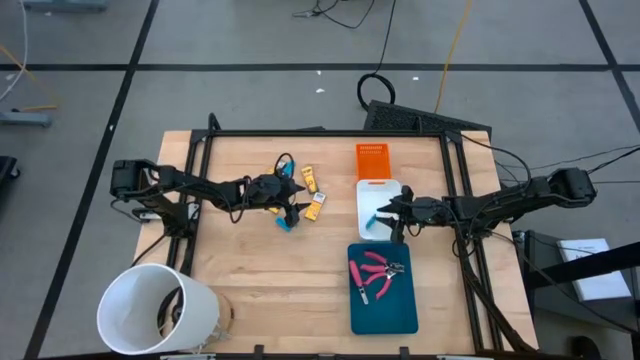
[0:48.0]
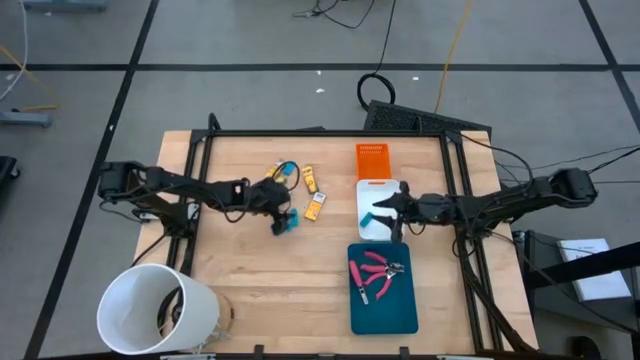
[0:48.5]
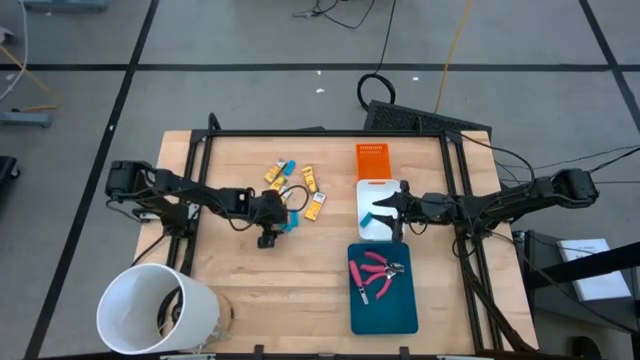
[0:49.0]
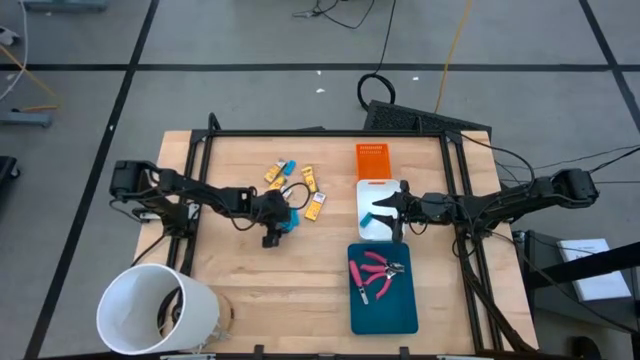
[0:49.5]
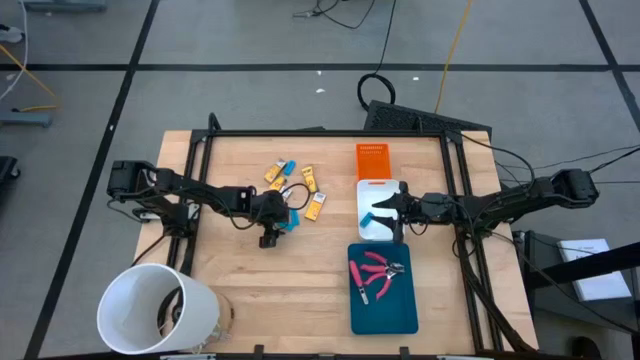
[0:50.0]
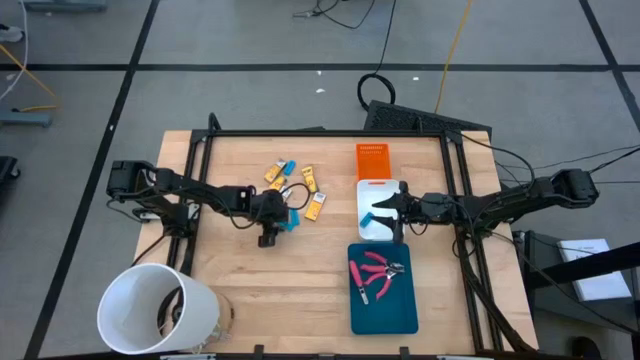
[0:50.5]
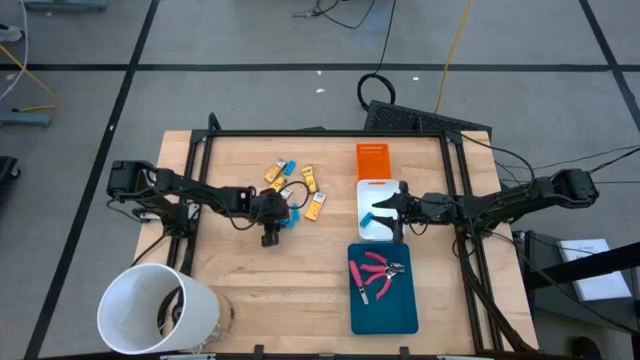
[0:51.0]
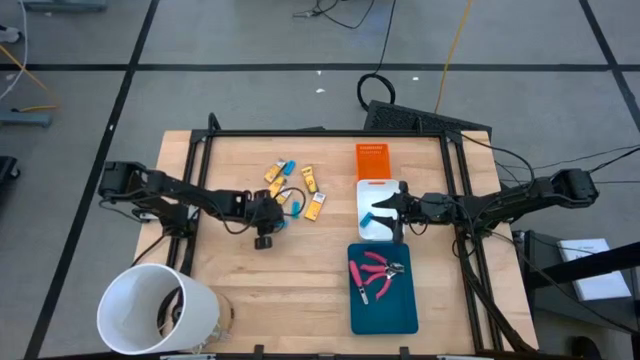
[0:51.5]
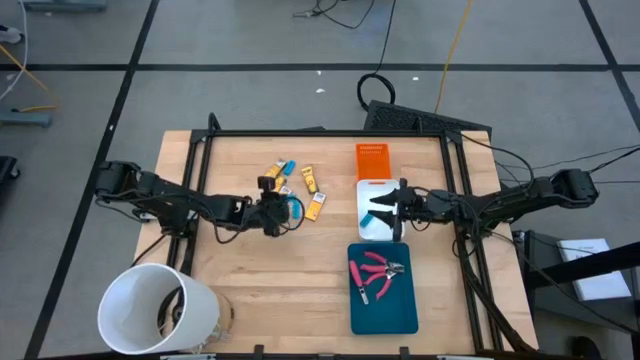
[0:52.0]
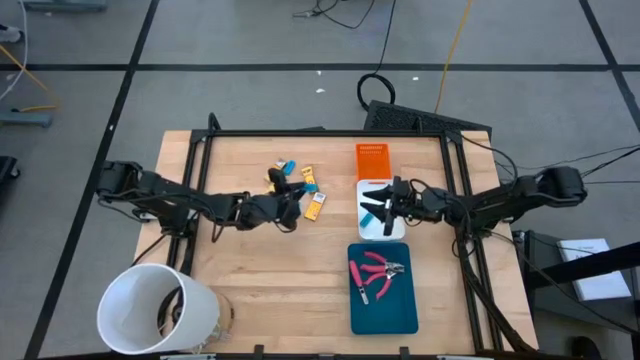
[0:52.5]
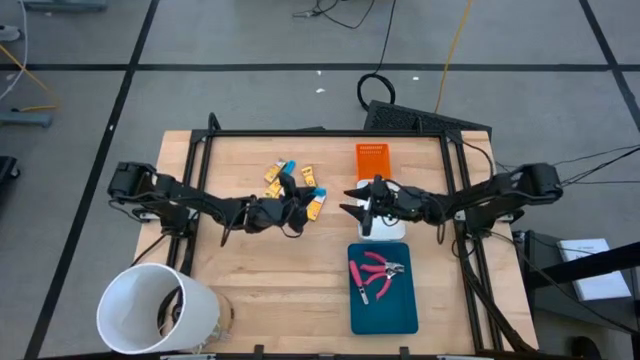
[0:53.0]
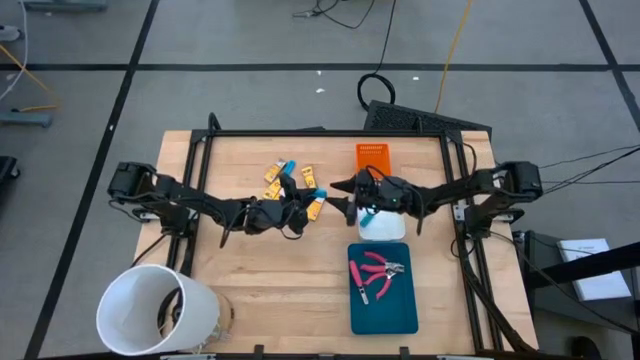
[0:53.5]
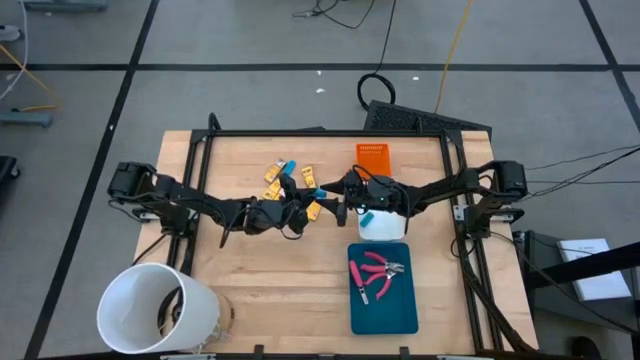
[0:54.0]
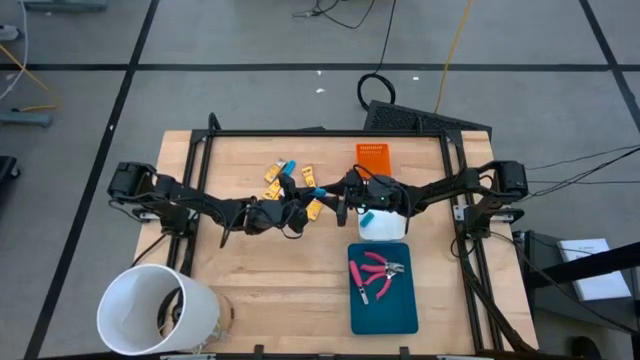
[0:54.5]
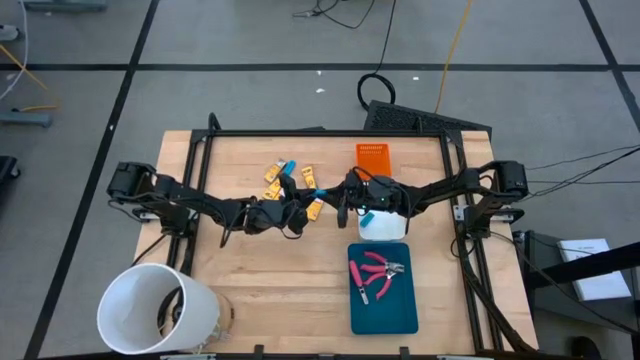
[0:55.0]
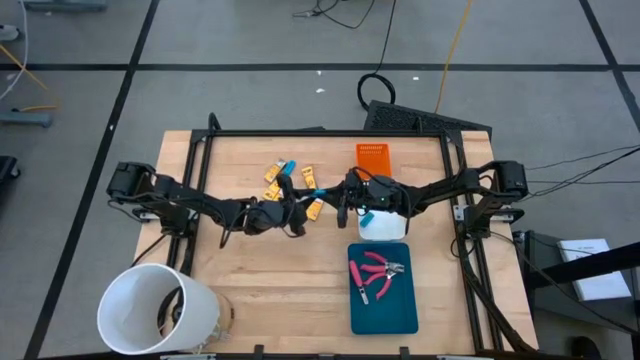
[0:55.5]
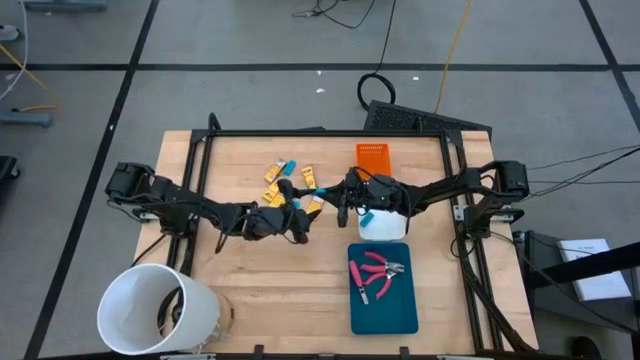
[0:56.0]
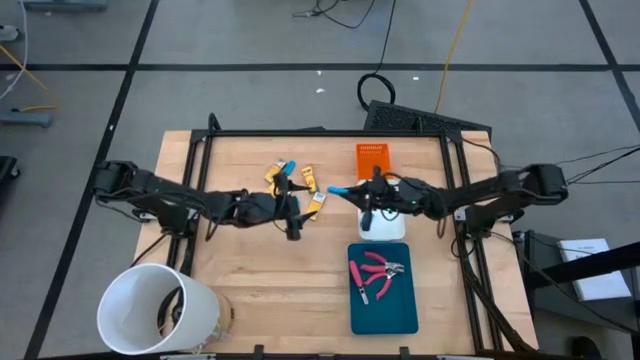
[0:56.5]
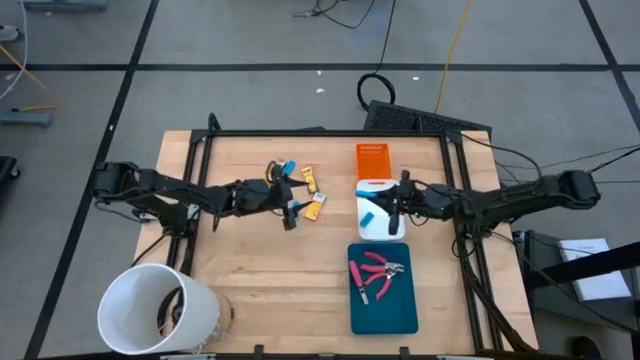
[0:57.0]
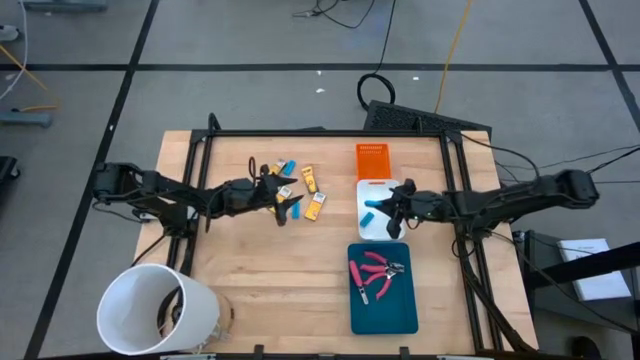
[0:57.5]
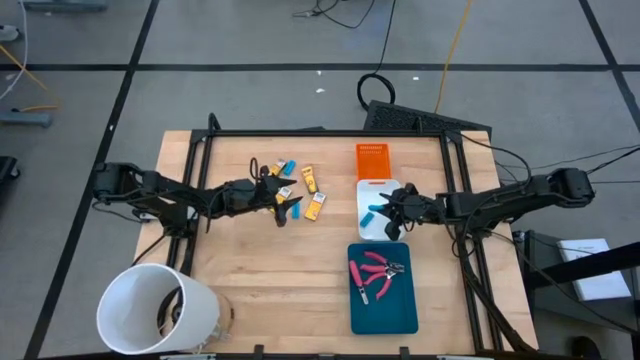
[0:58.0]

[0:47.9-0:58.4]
Task: Pick & Place School Supplies
Put the blue eraser into the white bin

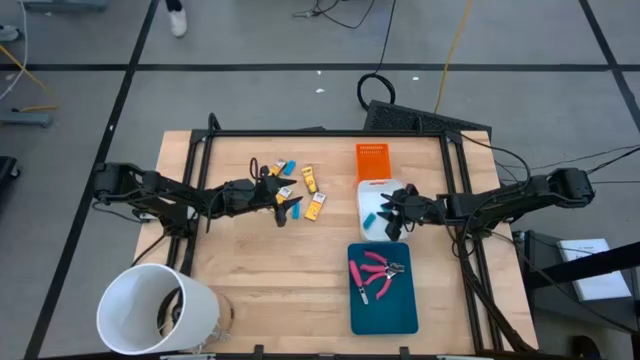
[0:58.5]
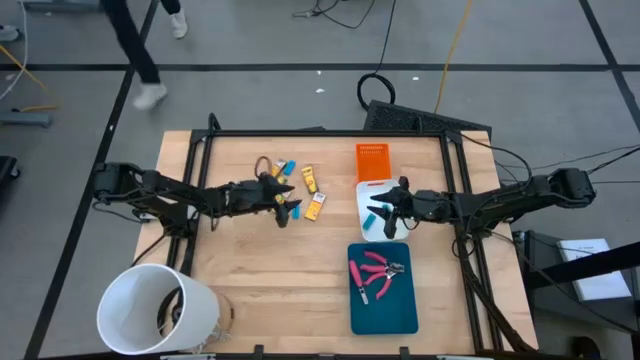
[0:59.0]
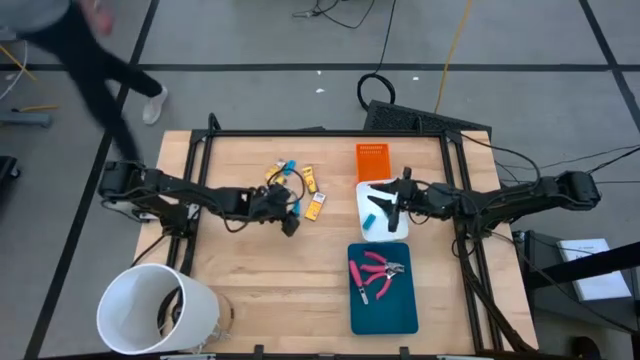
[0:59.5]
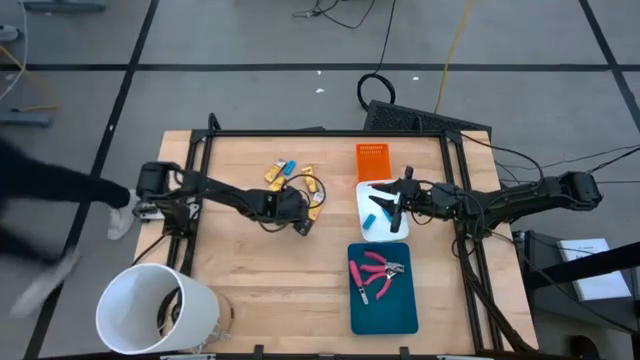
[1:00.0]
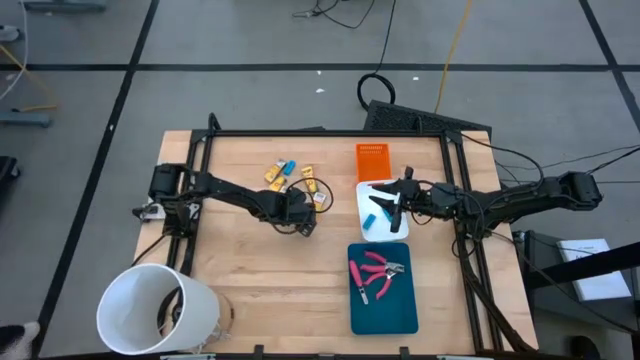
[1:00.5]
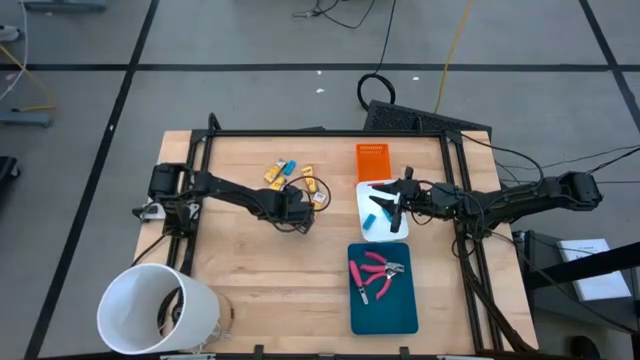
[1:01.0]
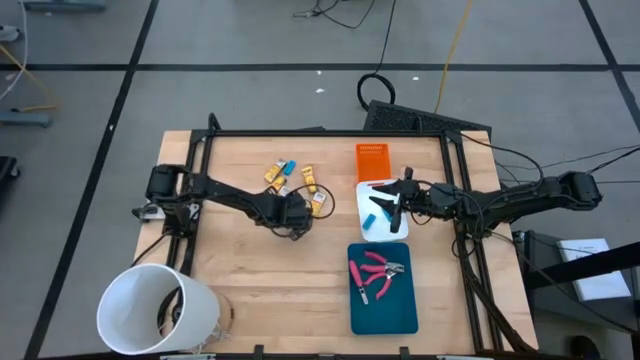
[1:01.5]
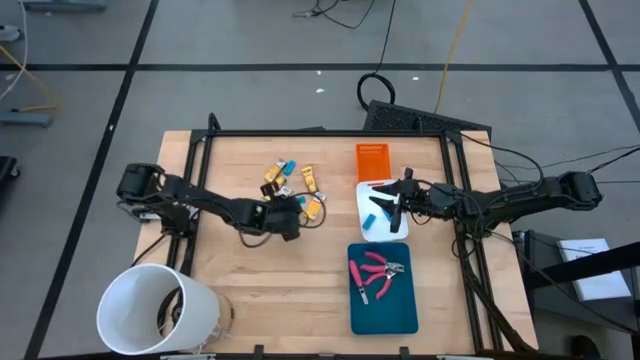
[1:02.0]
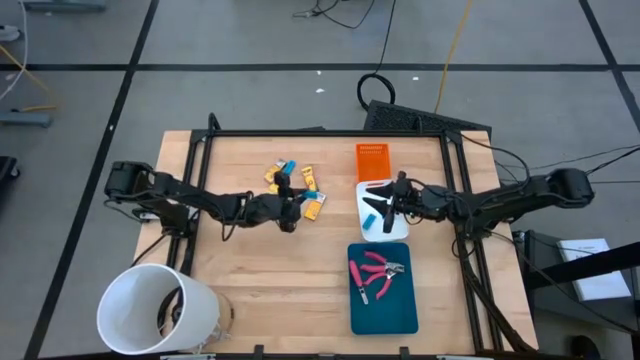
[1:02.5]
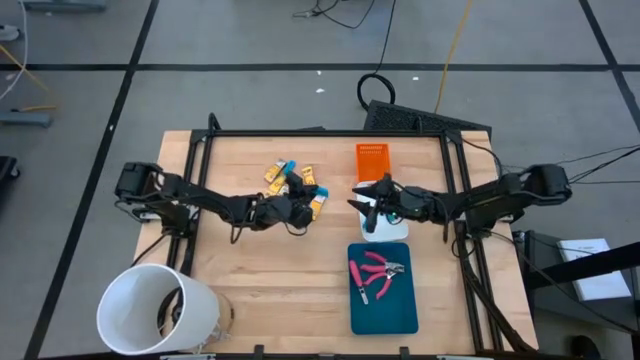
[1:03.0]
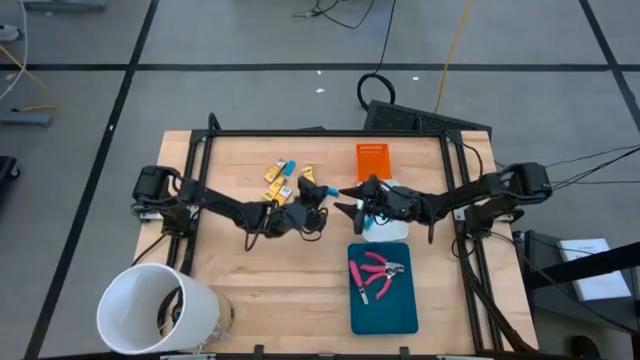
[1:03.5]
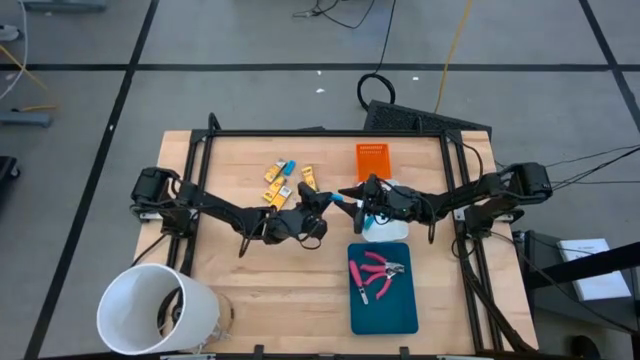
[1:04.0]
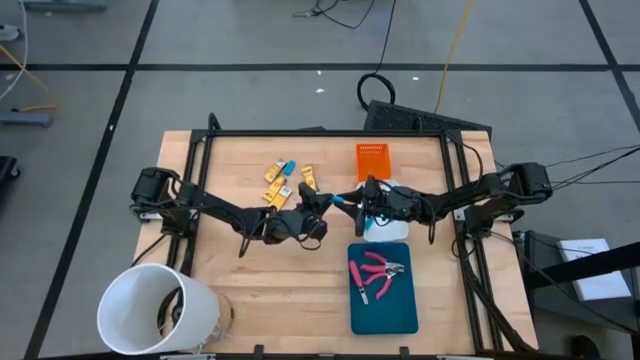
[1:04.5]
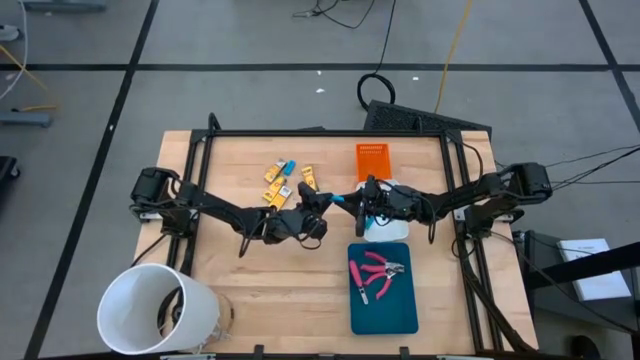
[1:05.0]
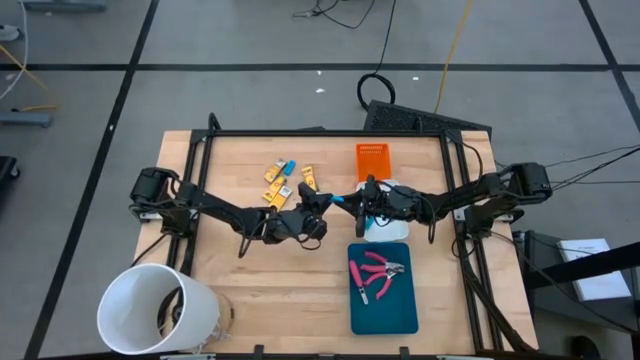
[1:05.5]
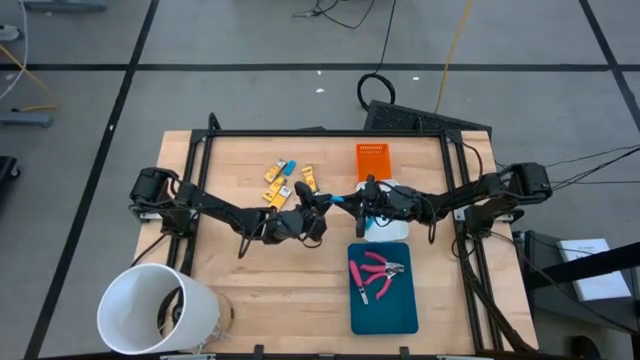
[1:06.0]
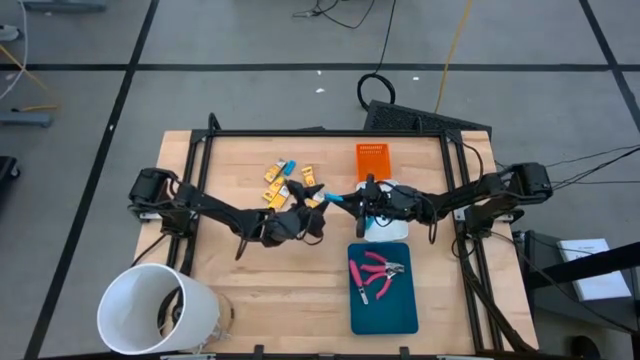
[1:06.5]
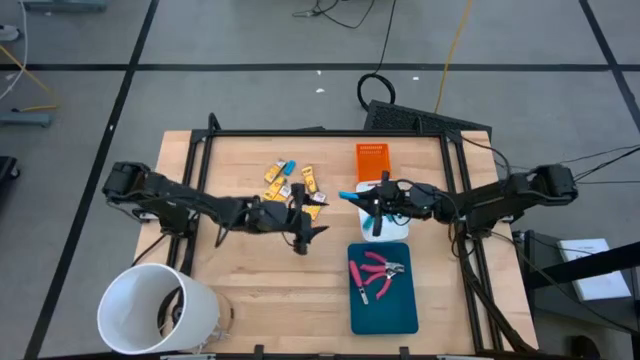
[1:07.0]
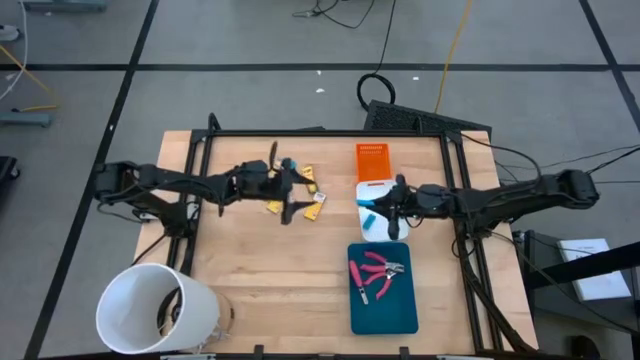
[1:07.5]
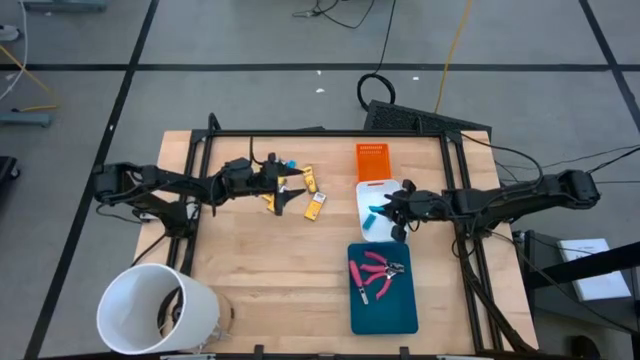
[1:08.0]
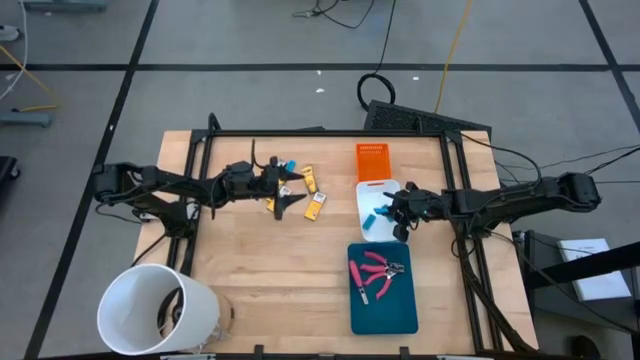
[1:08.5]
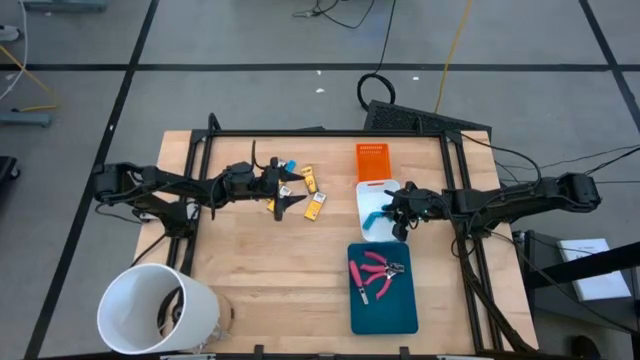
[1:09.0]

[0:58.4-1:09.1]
Put the blue eraser into the white bin

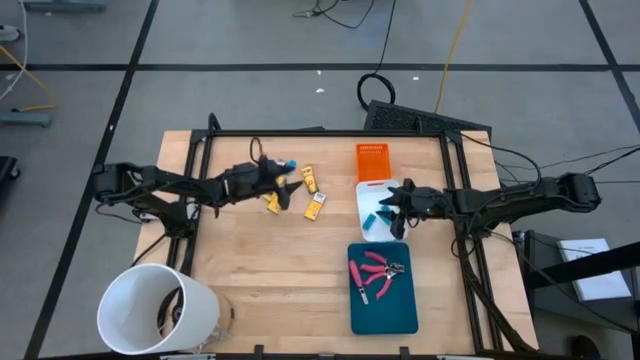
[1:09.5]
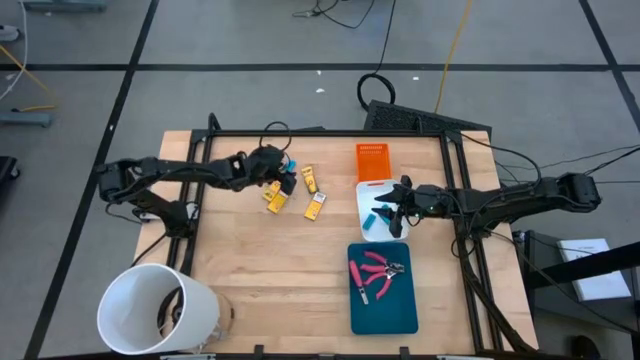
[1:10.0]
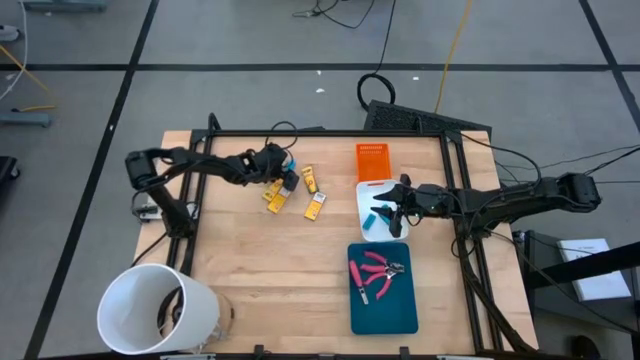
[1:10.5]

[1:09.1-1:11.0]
Put the yellow crayon box into the orange bin
